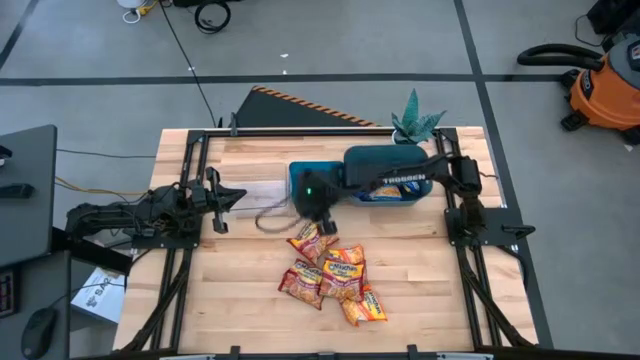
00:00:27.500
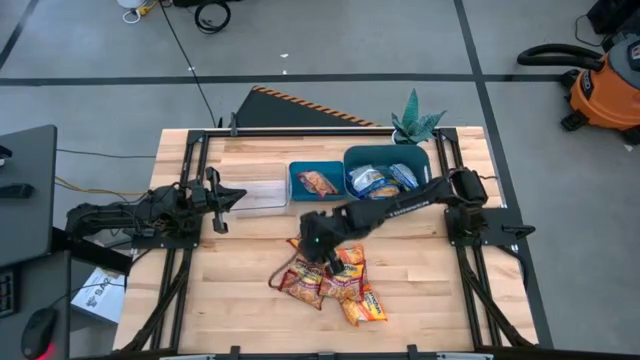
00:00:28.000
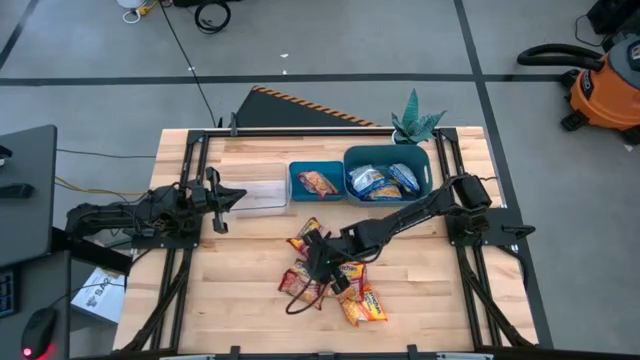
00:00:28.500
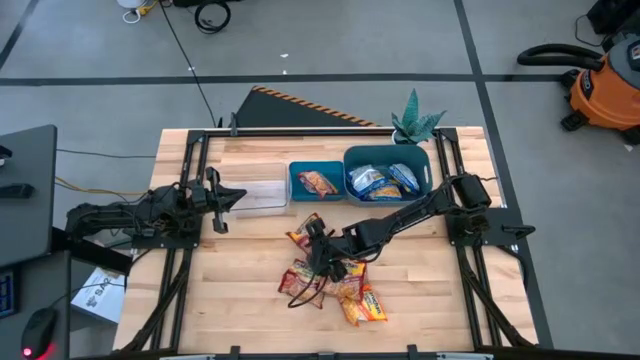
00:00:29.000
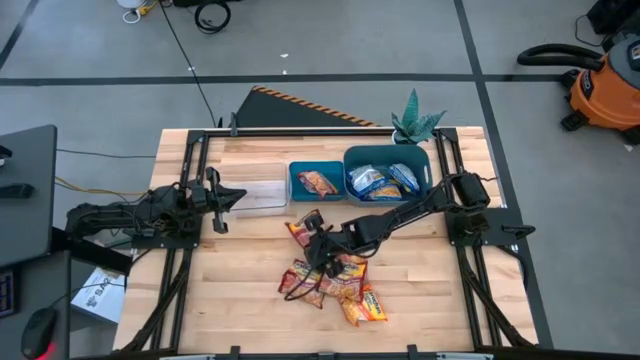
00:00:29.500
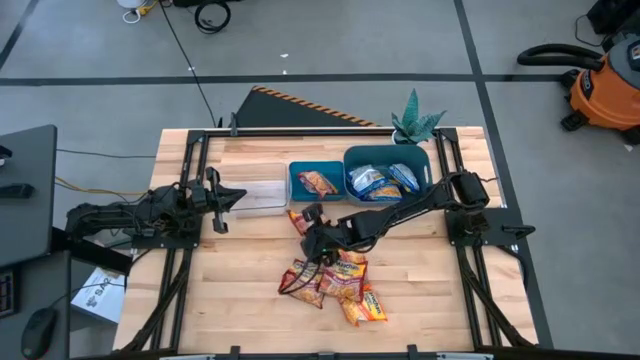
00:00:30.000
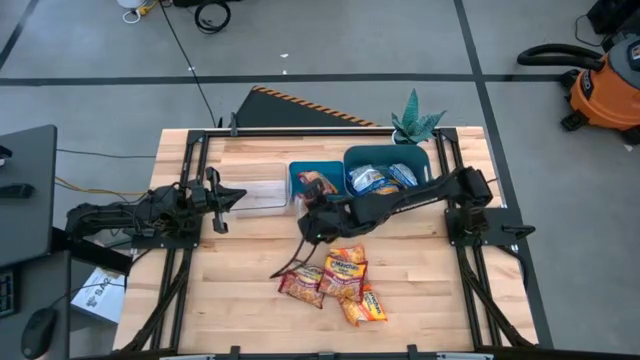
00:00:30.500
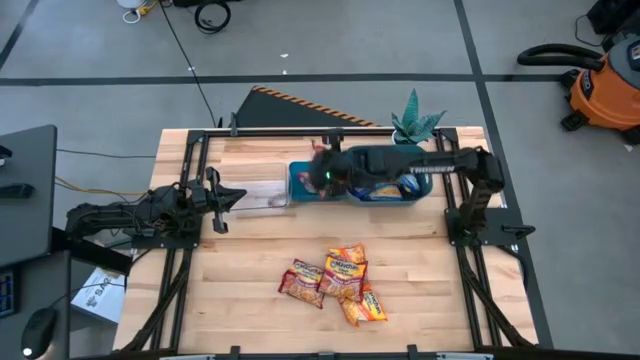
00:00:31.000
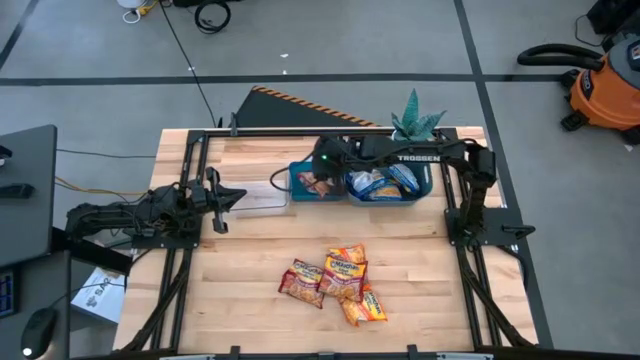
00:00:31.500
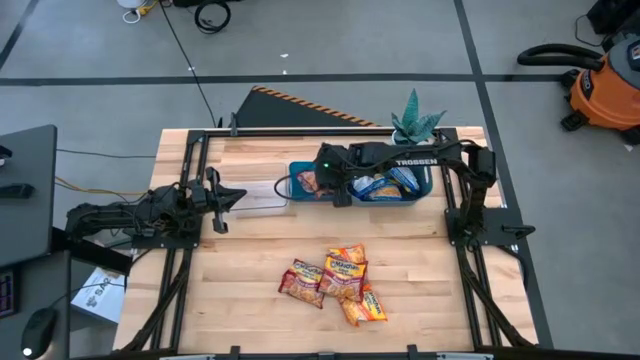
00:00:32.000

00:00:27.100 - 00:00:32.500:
Task: Sort Maruchan noodles
Put the red bag into the left blue bin

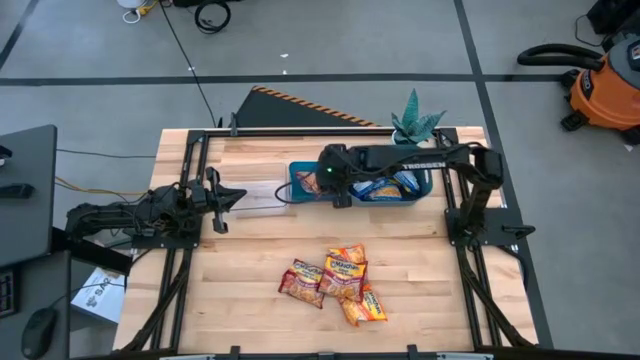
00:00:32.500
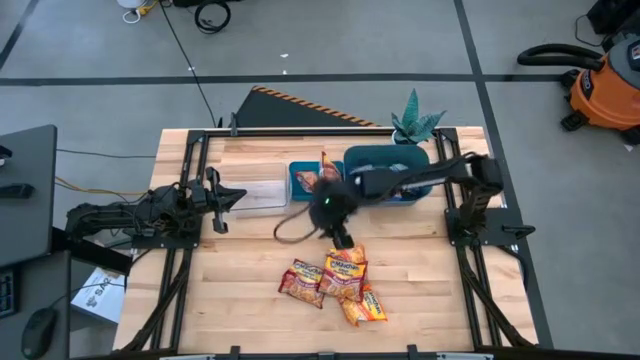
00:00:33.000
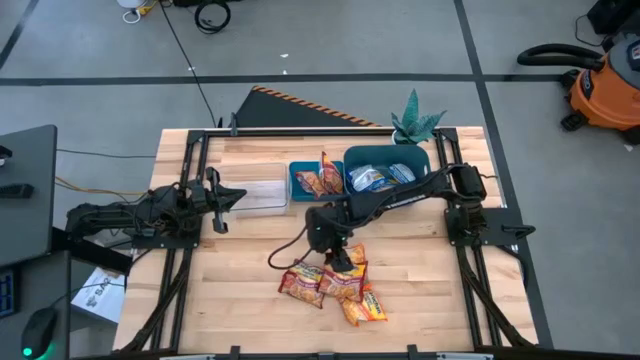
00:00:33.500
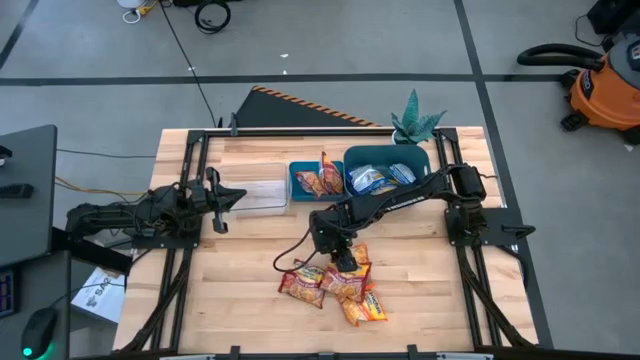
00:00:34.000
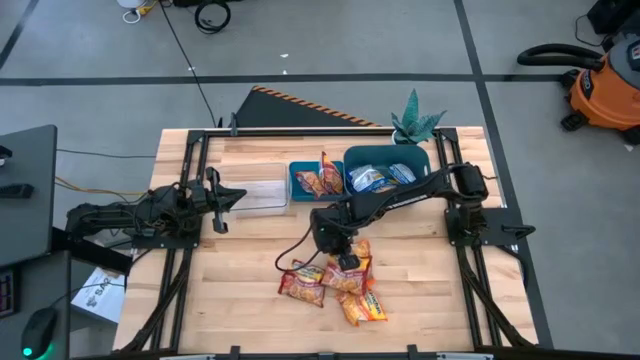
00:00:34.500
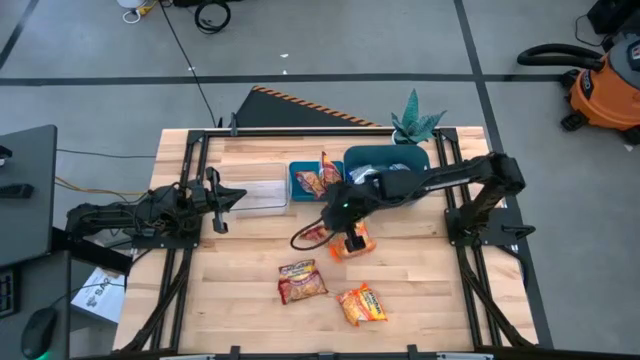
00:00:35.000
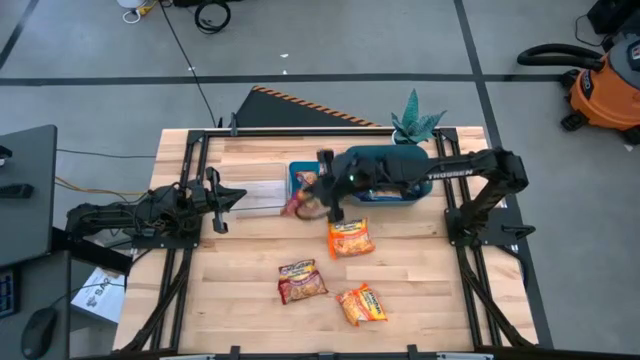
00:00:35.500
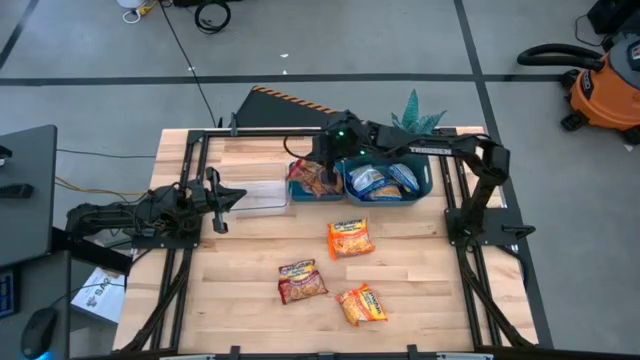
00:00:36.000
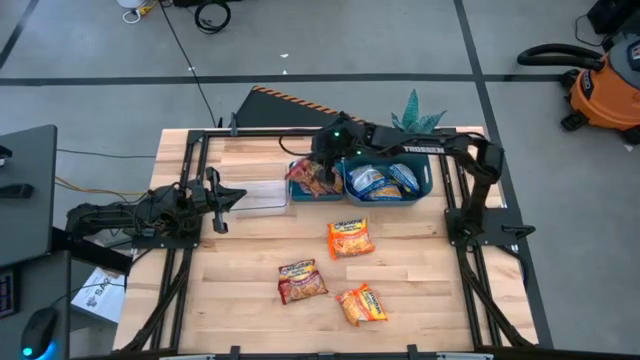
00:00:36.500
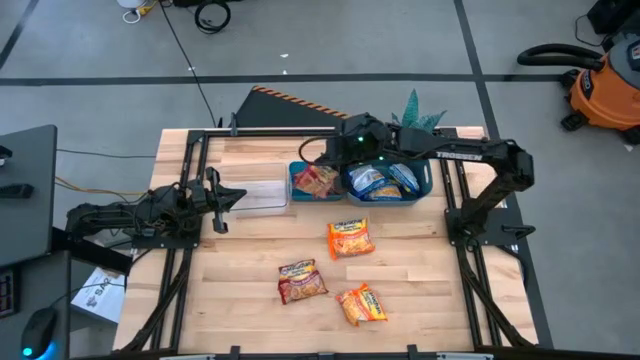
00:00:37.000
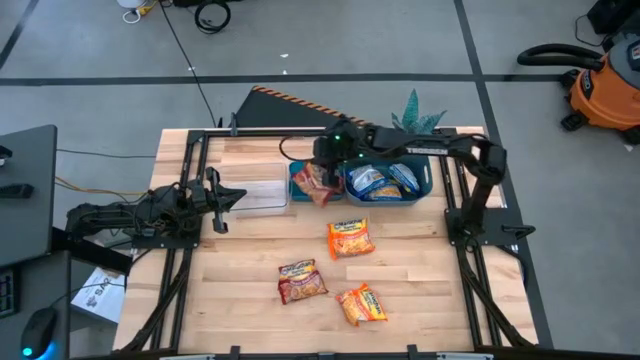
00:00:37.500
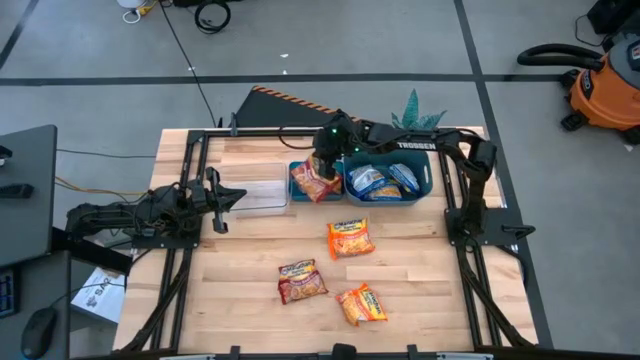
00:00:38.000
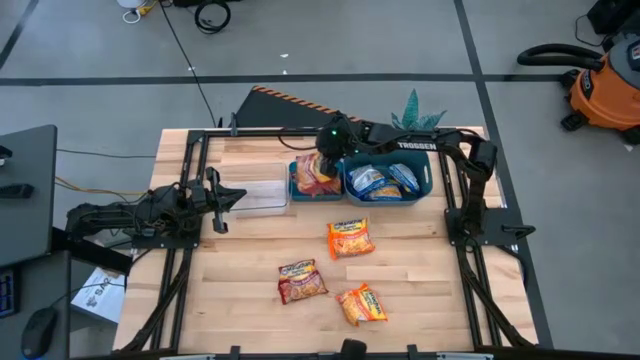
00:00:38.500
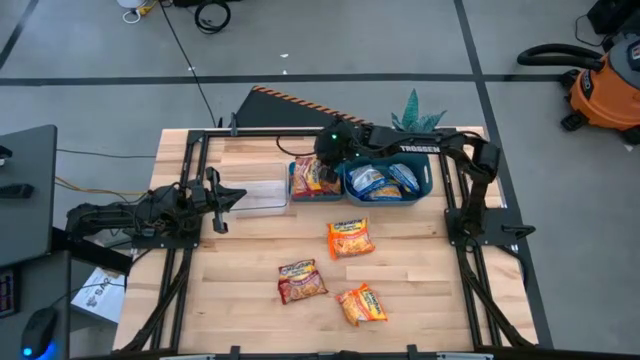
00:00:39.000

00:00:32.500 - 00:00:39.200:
Put the red bag into the left blue bin

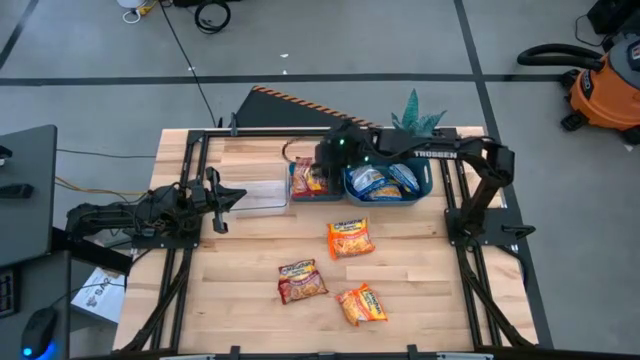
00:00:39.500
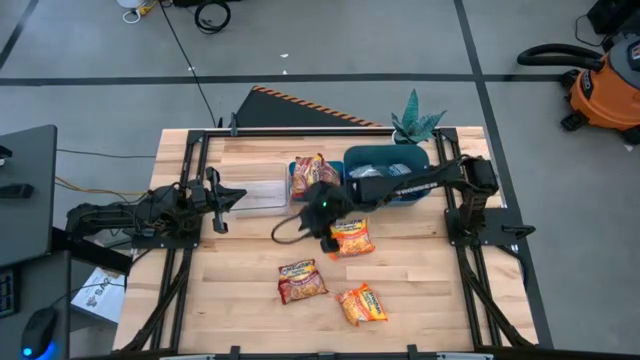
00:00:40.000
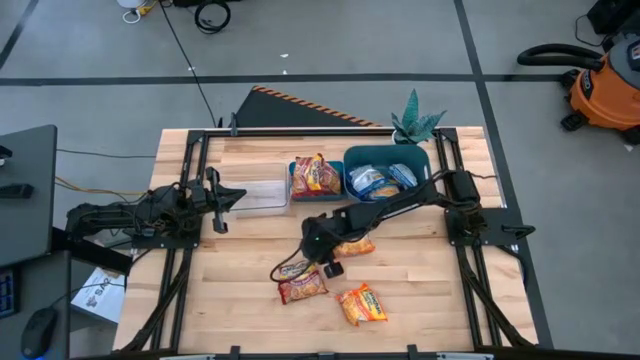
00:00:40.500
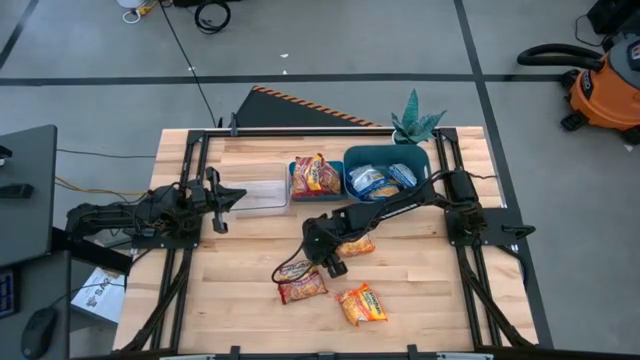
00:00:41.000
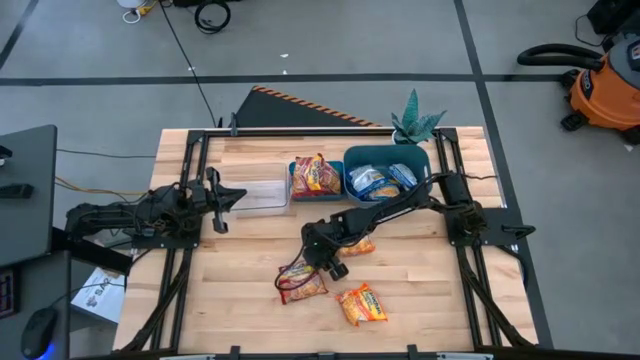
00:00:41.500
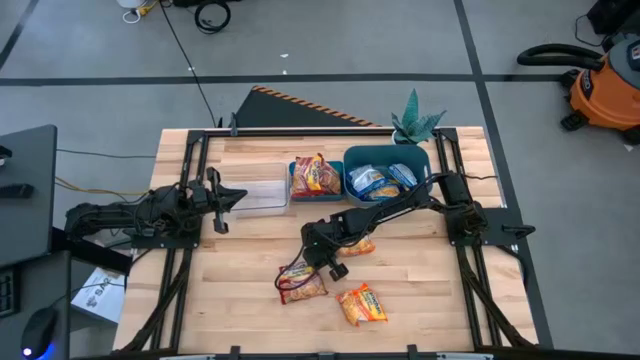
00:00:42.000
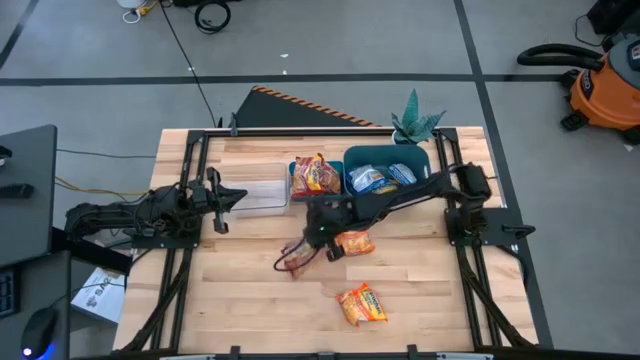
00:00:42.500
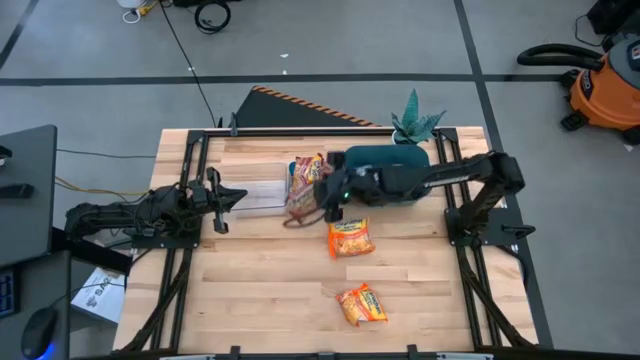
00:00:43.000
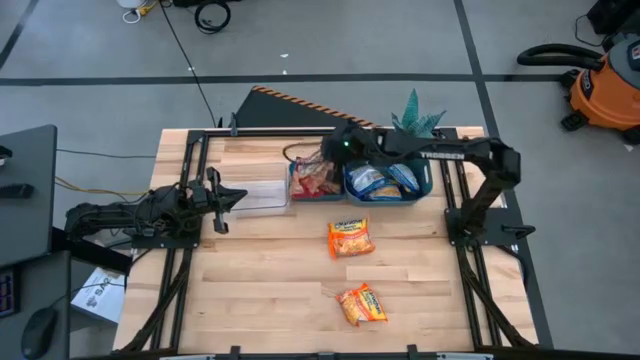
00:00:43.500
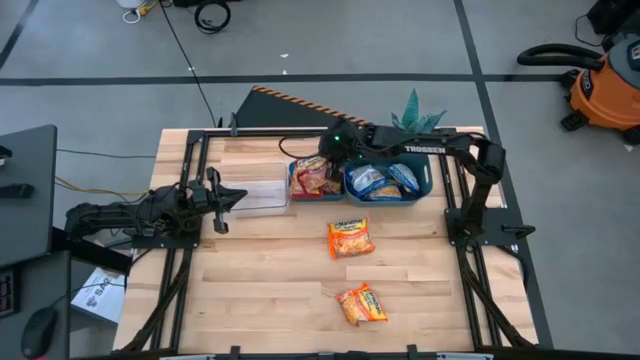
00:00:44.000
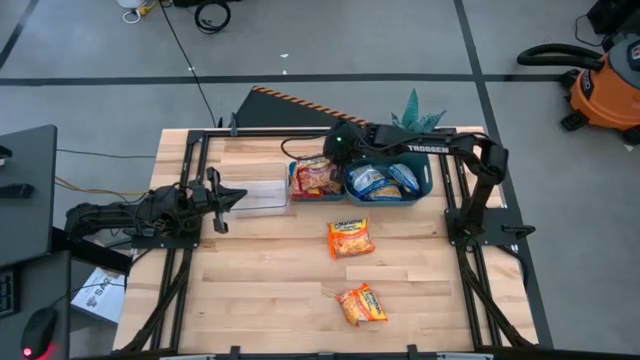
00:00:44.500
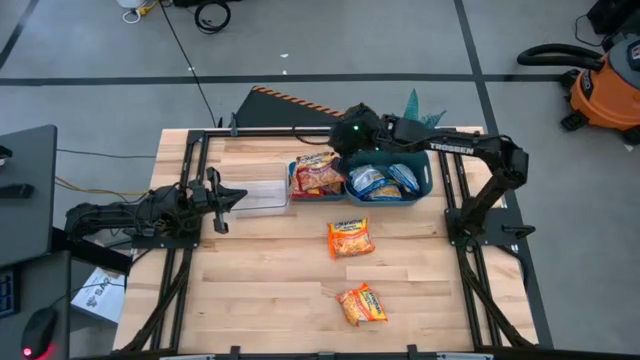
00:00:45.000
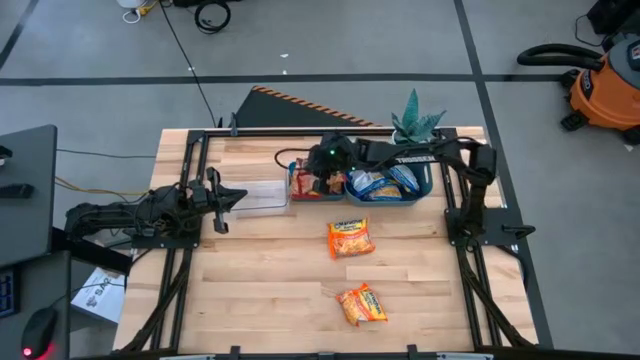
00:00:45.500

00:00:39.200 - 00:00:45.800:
Put the red bag into the left blue bin

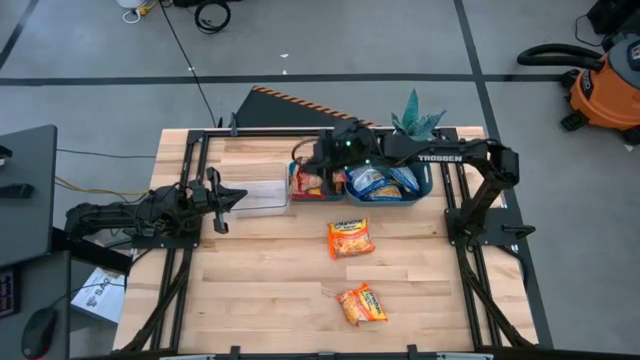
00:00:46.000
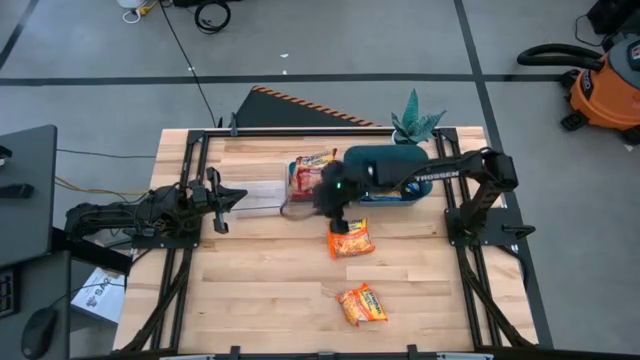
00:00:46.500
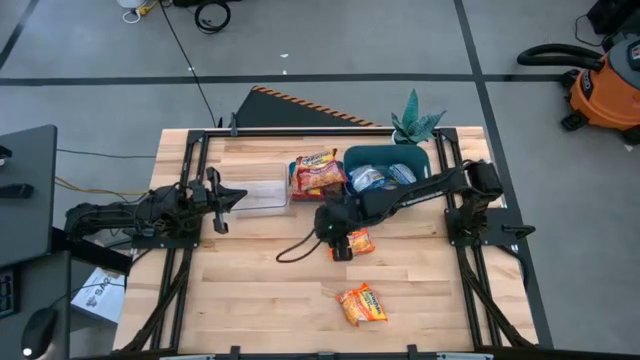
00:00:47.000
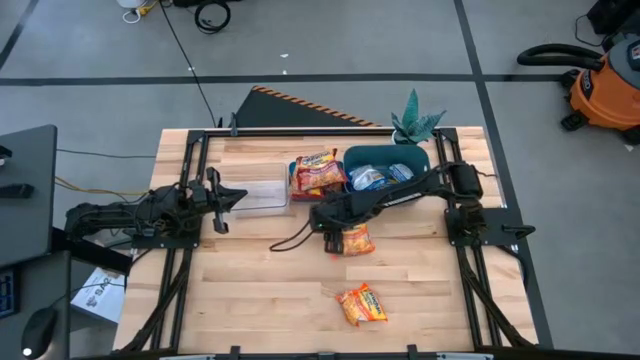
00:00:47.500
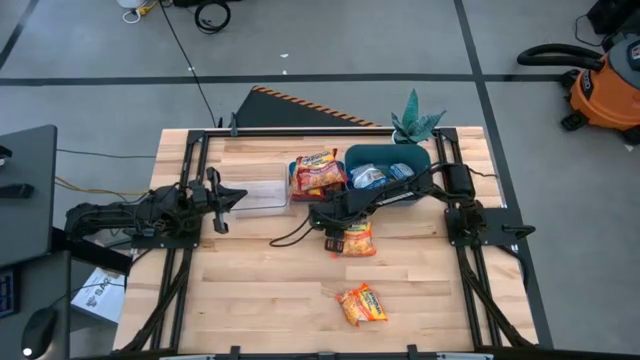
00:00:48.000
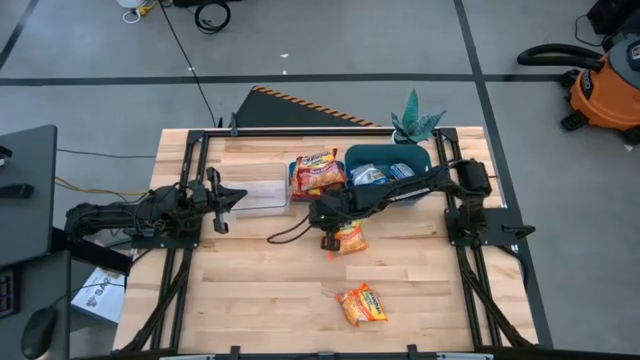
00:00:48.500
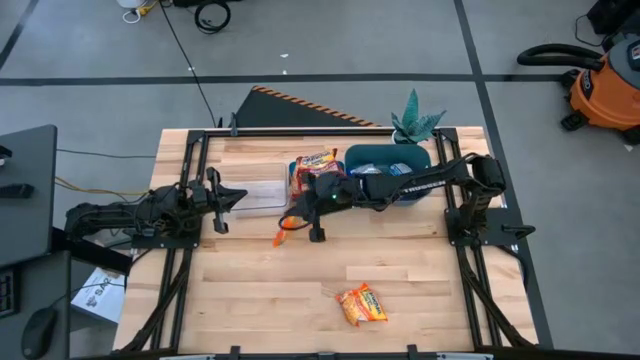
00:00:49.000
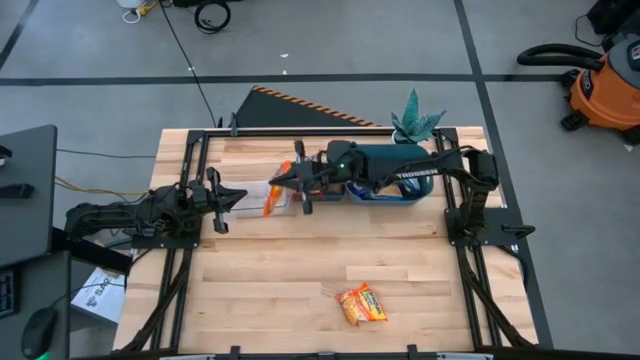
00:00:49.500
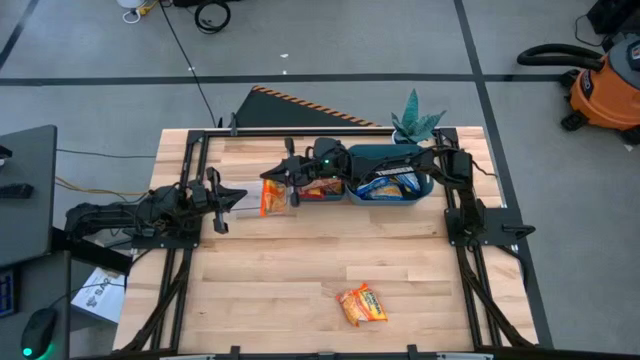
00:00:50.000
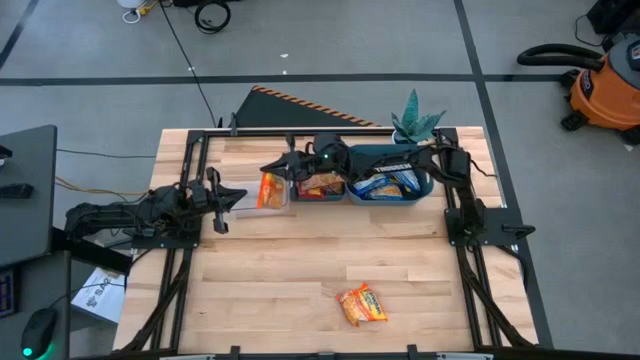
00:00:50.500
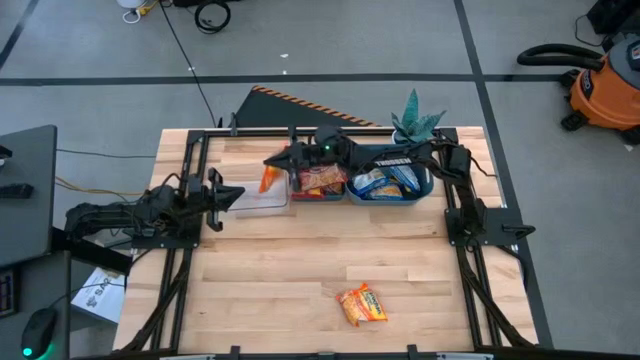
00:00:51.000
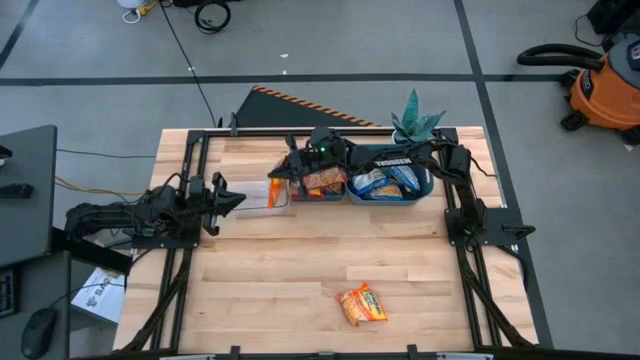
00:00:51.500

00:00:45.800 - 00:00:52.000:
Put the orange bag into the transparent bin
